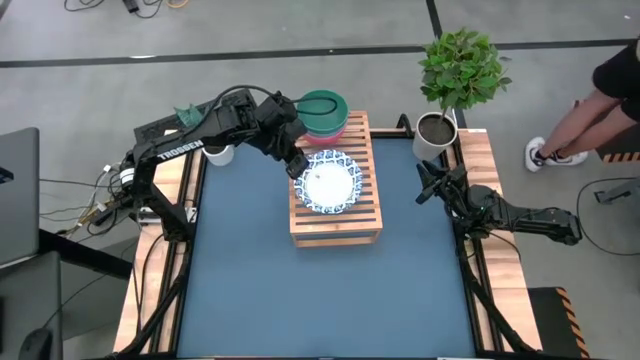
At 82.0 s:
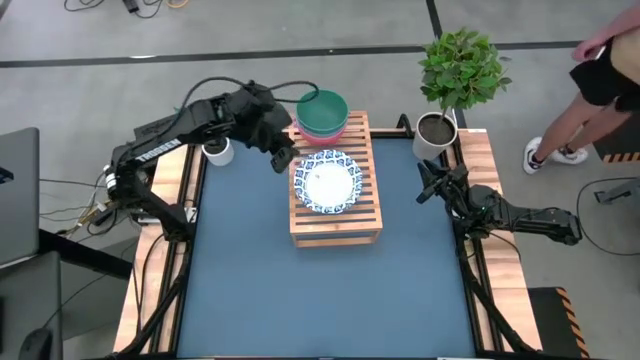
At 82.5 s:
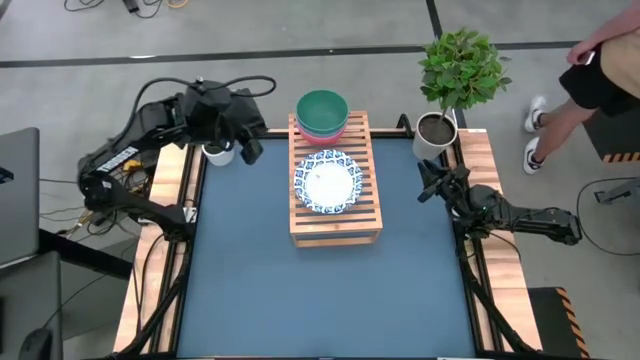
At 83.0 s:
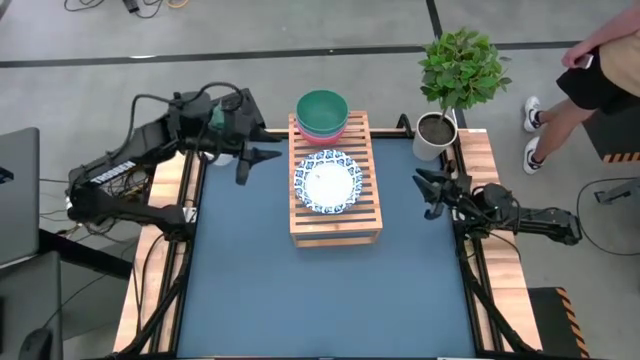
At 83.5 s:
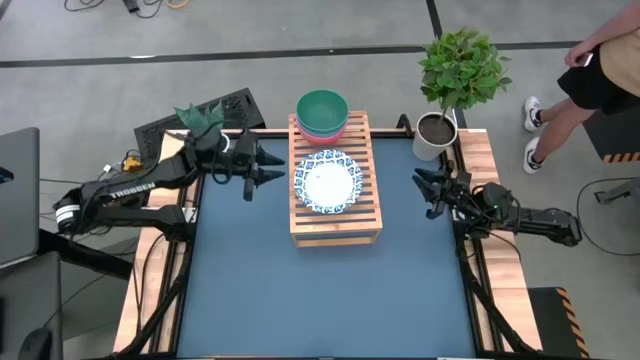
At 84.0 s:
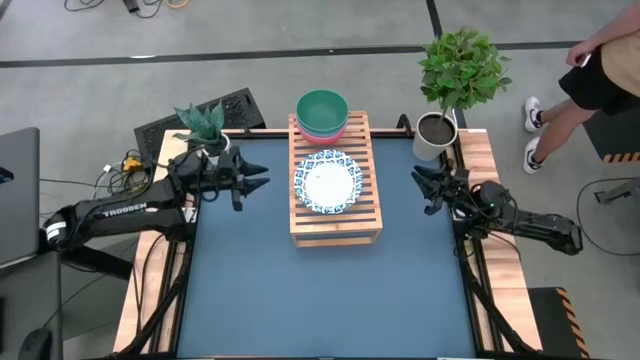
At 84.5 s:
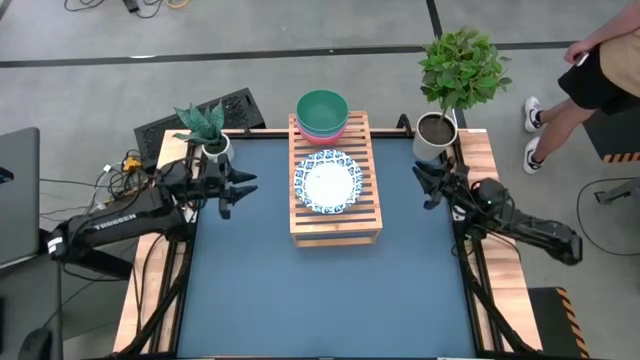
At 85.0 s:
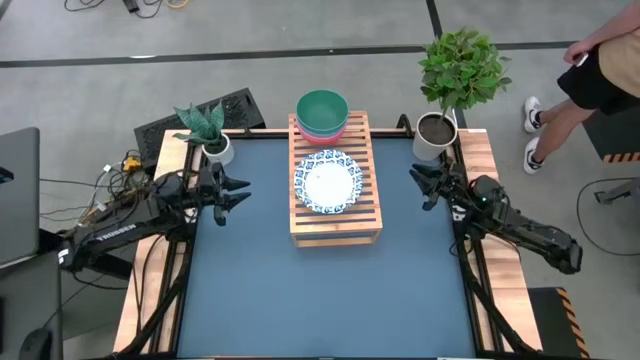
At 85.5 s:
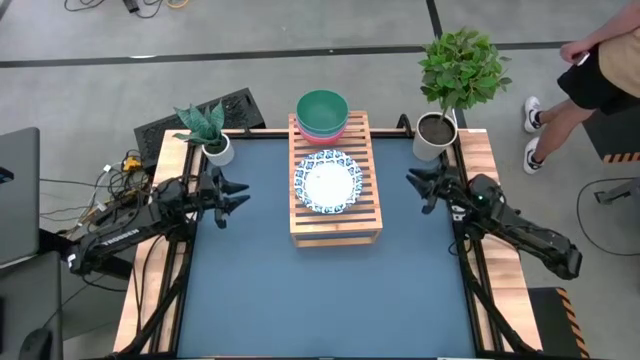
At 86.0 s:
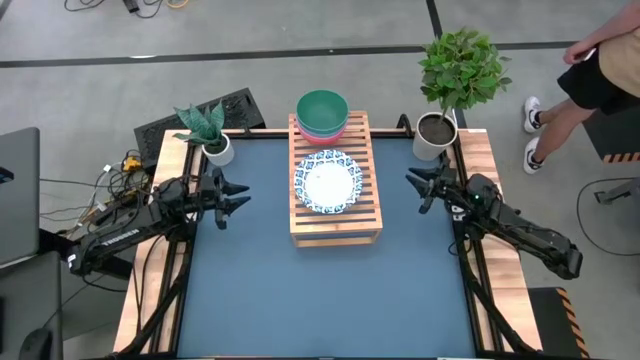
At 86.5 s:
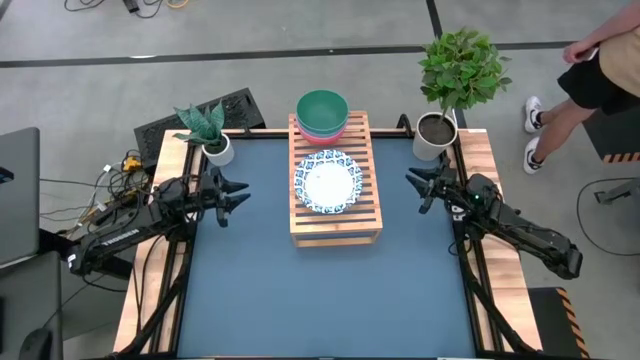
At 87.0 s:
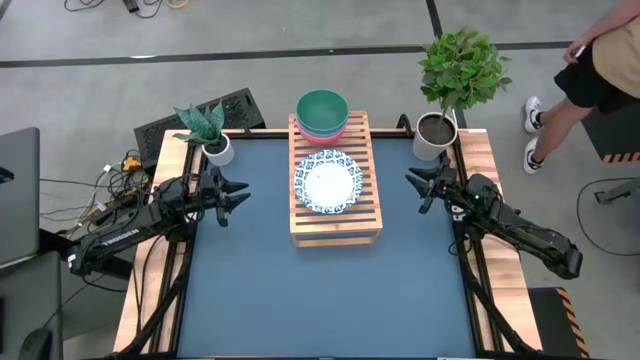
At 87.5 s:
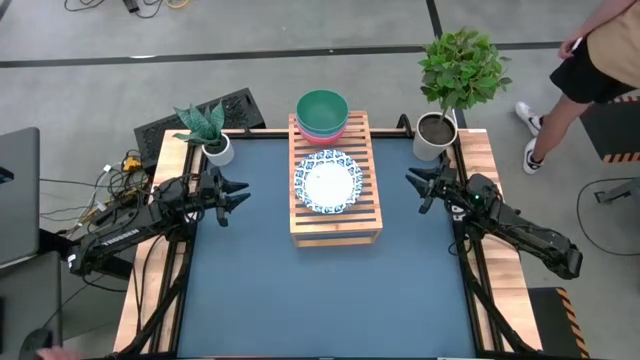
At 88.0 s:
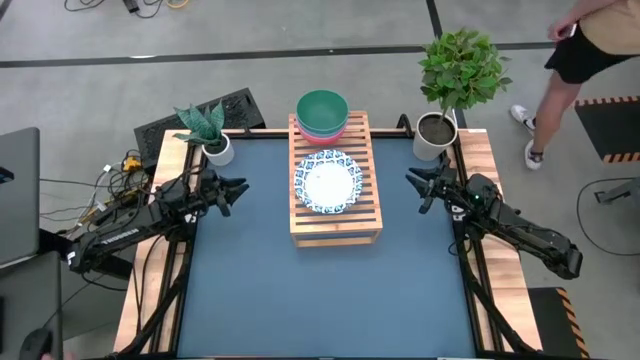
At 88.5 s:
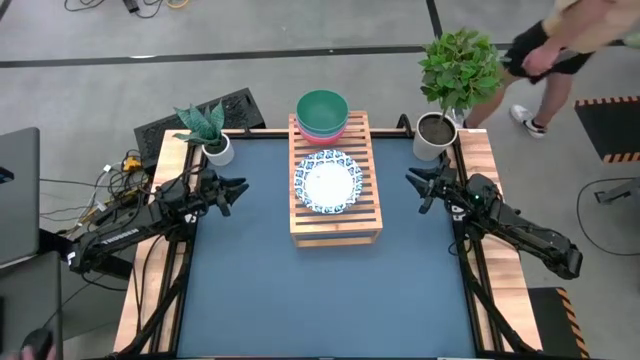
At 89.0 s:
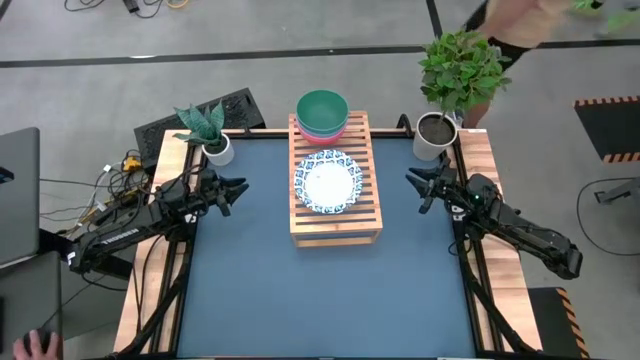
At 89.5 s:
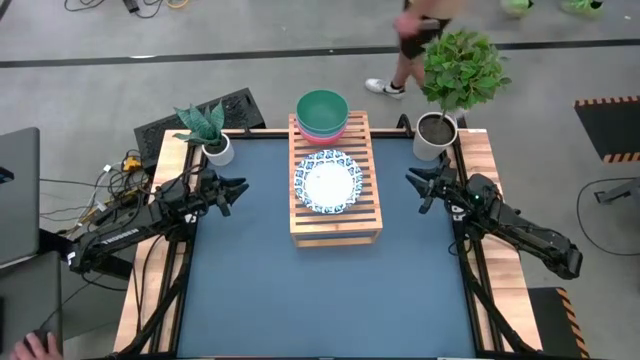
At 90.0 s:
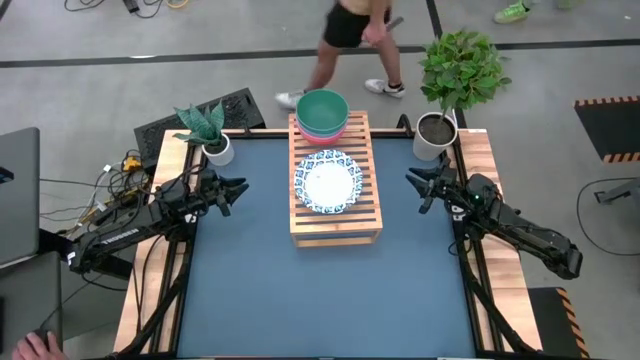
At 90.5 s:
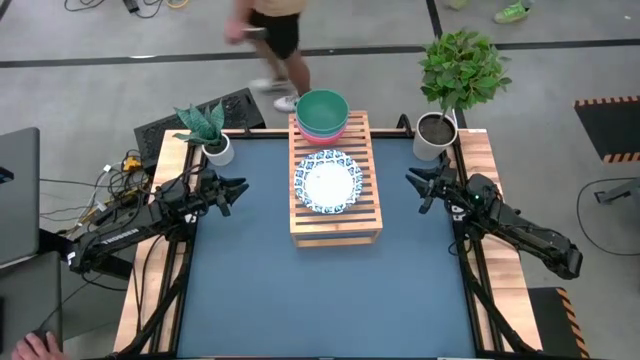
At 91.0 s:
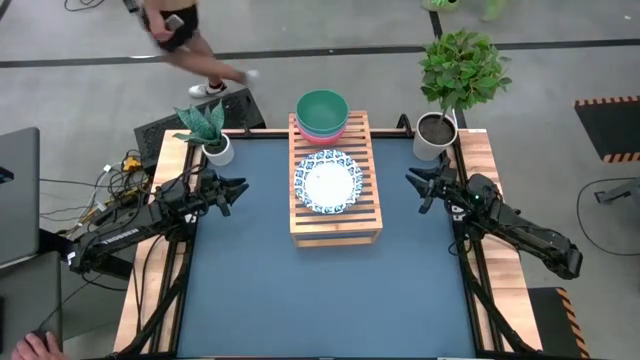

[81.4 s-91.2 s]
Task: Place and stack bowls onto a shelf
Return to Home Position

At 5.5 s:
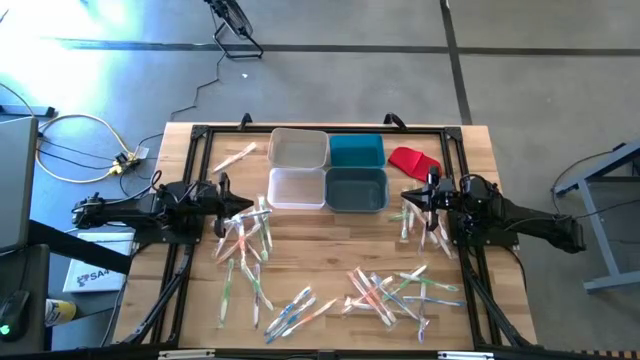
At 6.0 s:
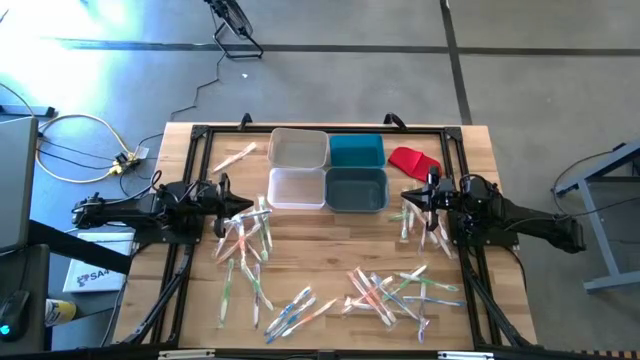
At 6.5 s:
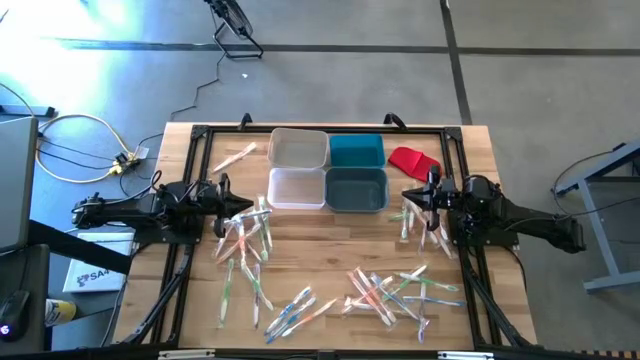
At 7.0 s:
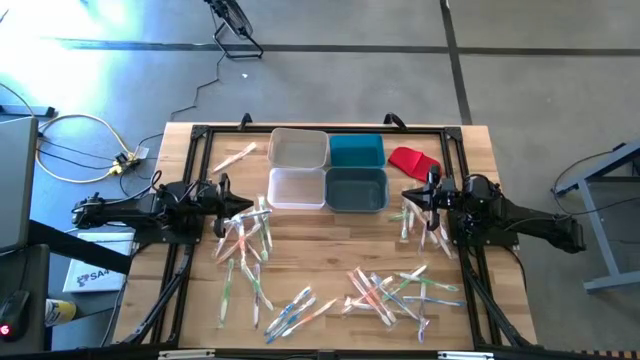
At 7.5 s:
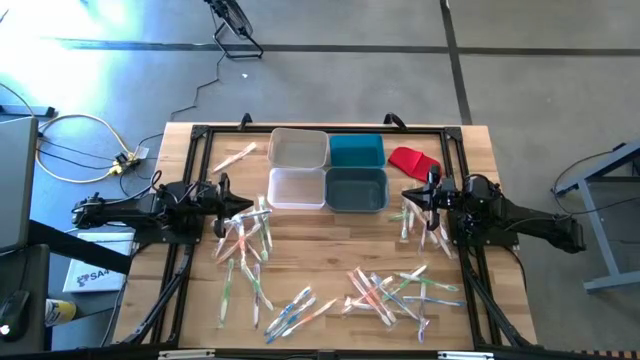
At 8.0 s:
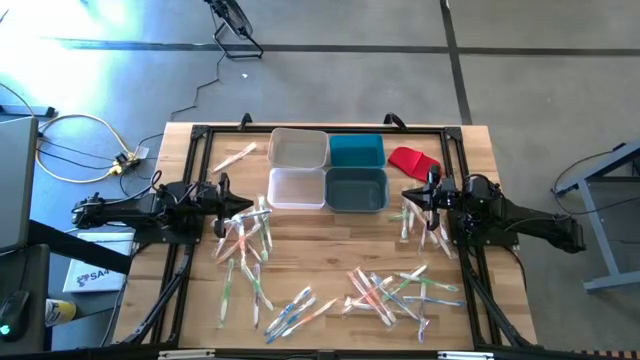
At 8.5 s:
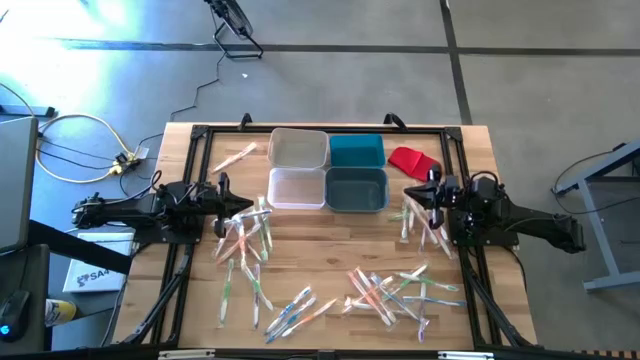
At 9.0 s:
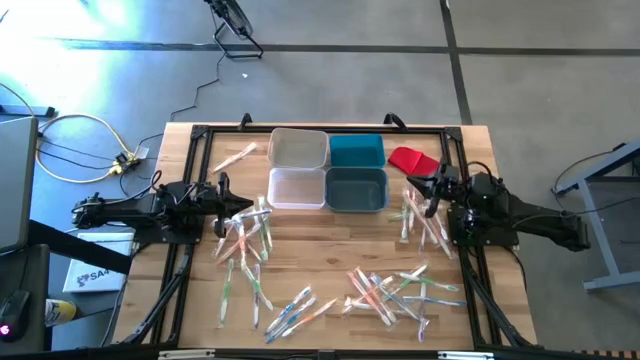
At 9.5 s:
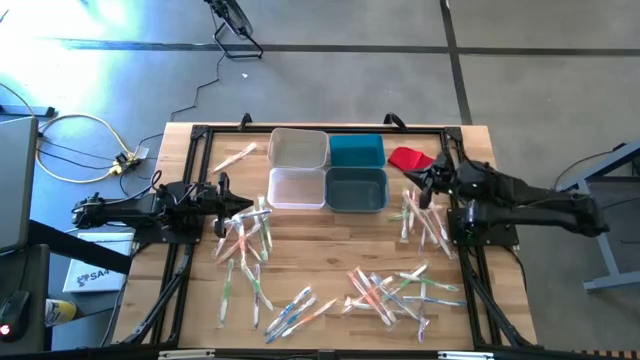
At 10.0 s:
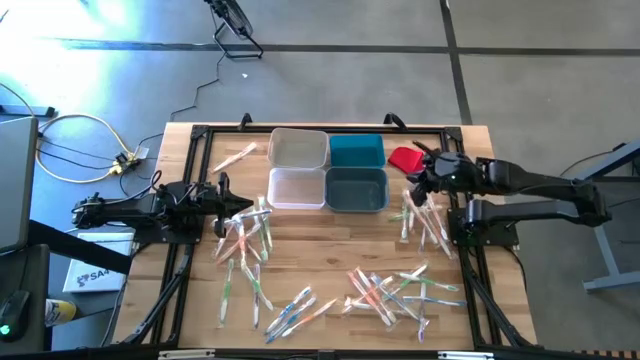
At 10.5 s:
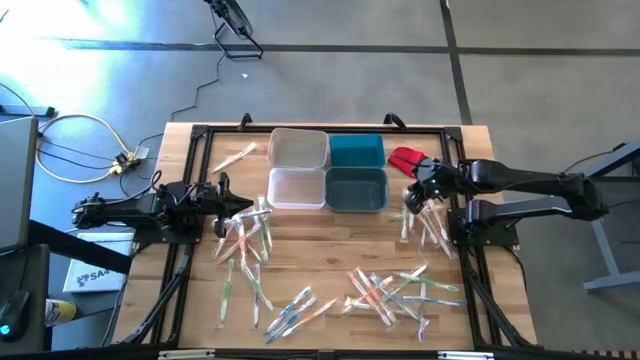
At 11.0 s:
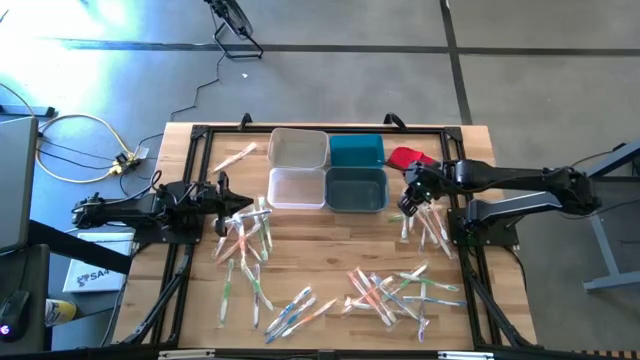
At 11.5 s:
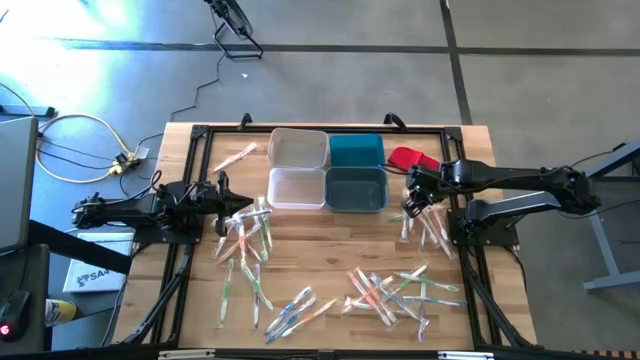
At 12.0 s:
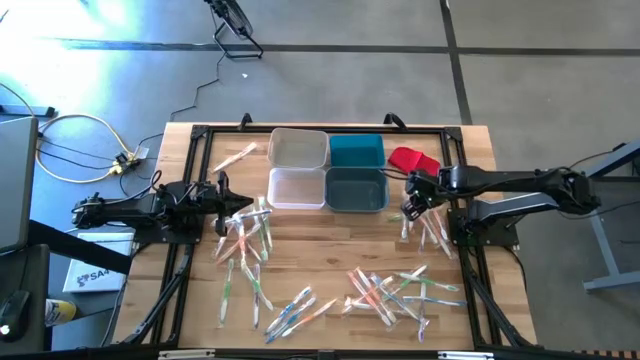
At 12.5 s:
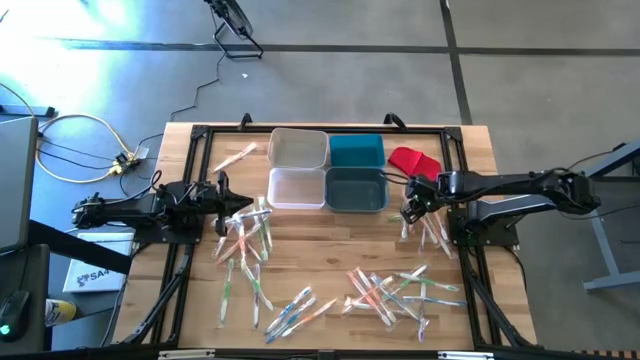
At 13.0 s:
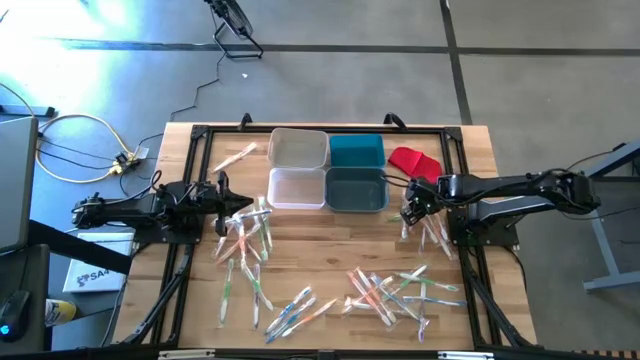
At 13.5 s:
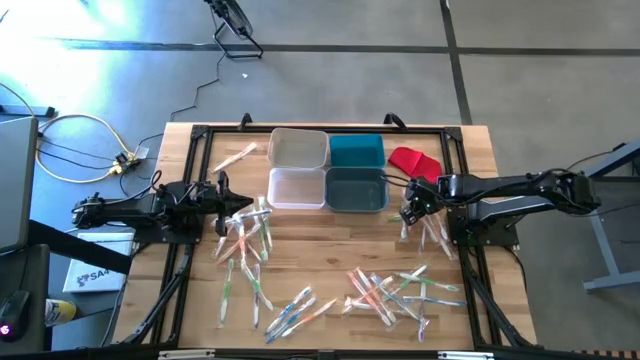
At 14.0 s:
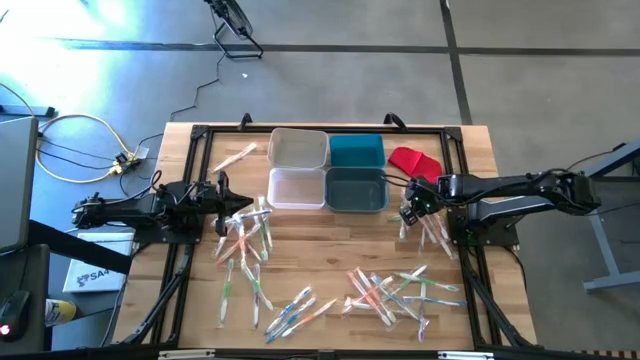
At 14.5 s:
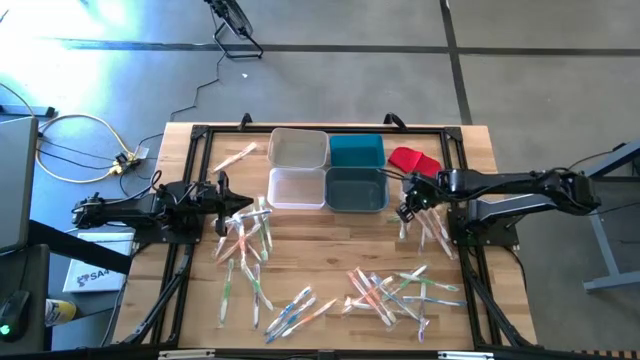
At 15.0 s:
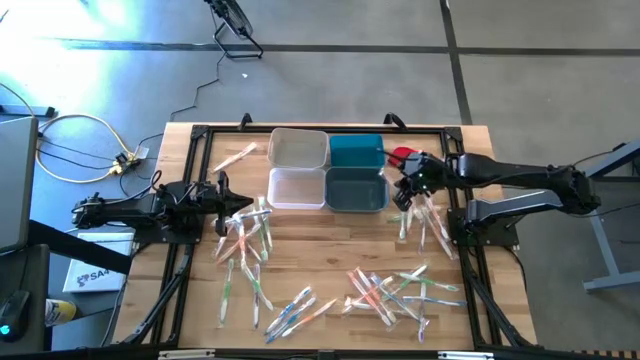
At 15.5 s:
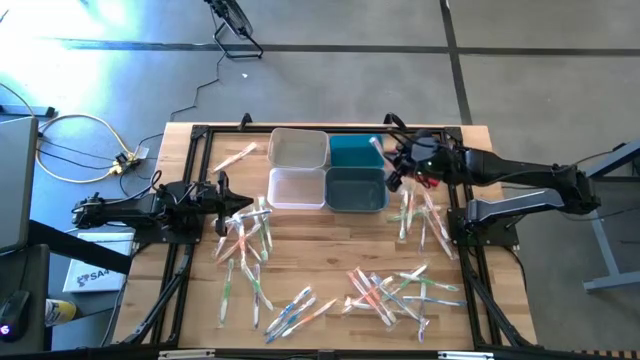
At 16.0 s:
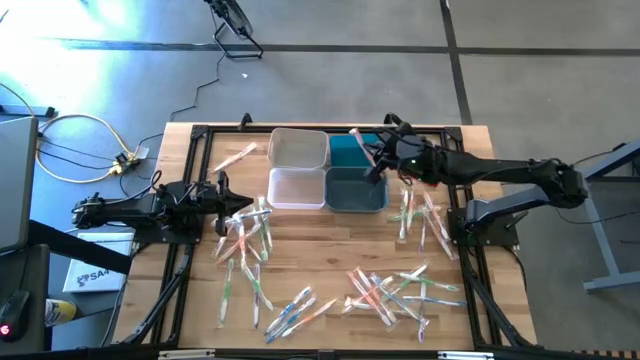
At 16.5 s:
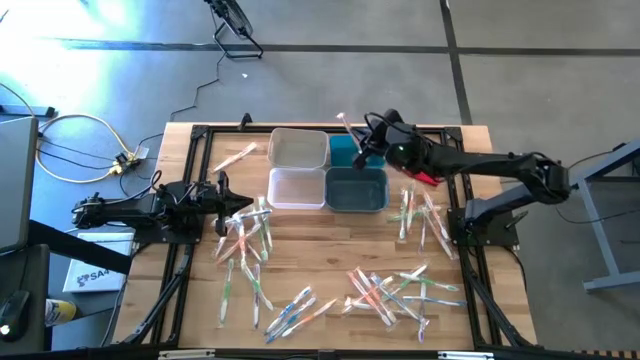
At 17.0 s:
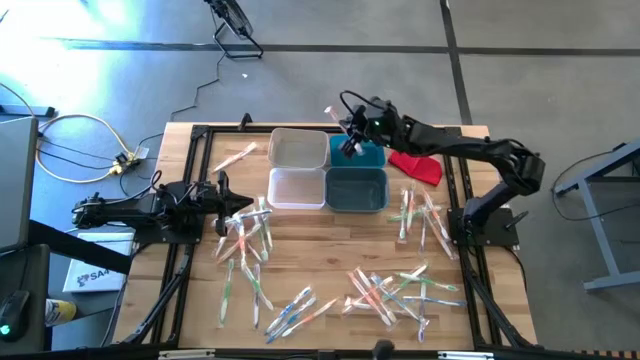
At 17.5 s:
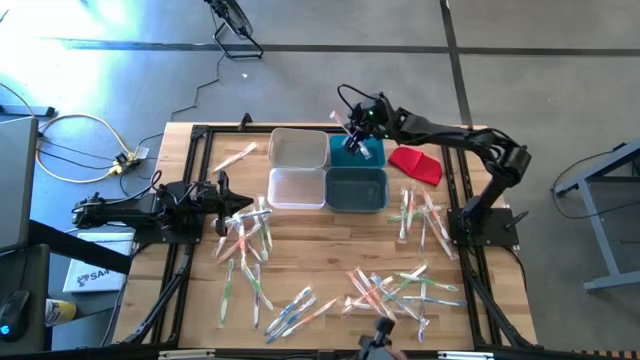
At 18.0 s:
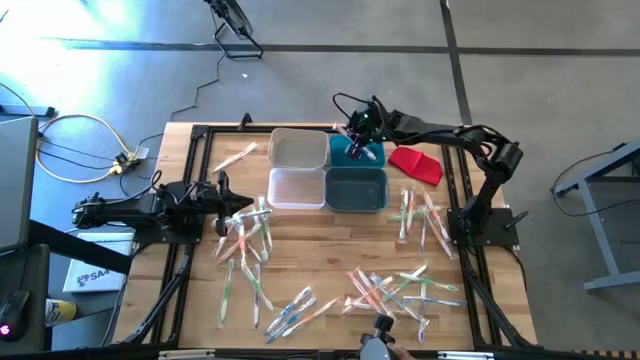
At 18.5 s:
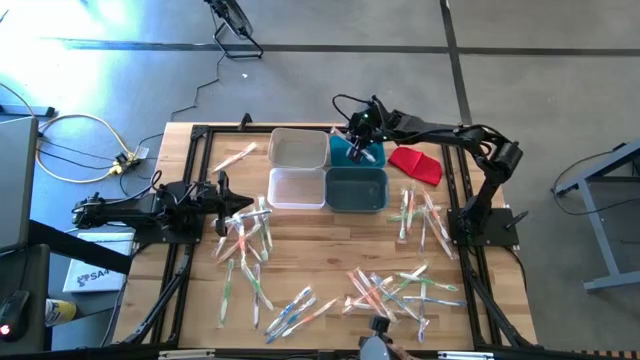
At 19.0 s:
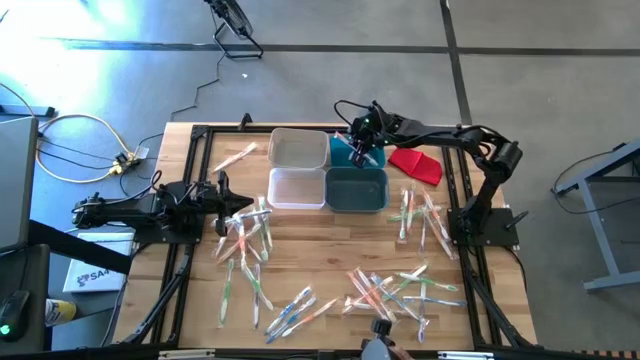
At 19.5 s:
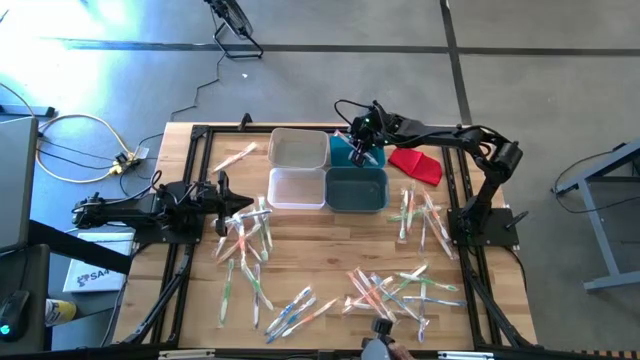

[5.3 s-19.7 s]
Task: Pick & Place Toothbrushes
Put the orange toothbrush into the blue bin
